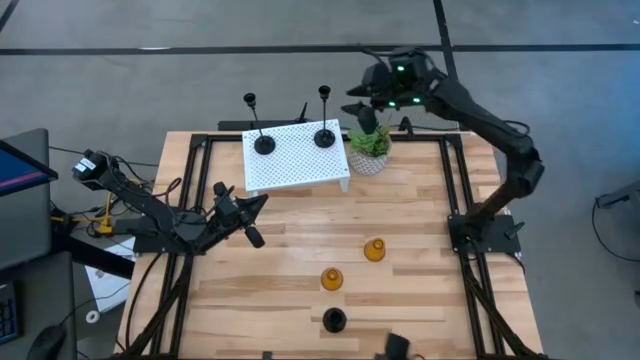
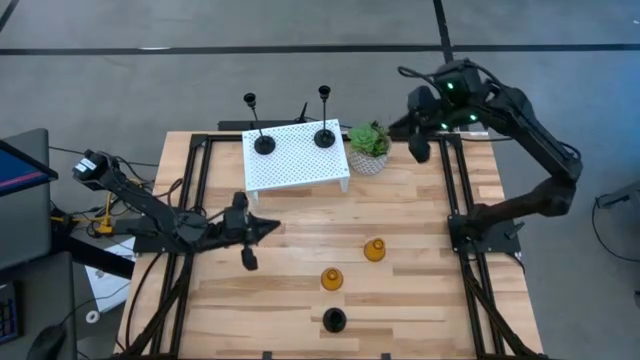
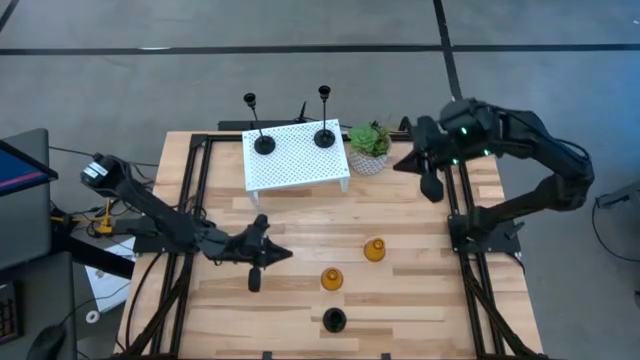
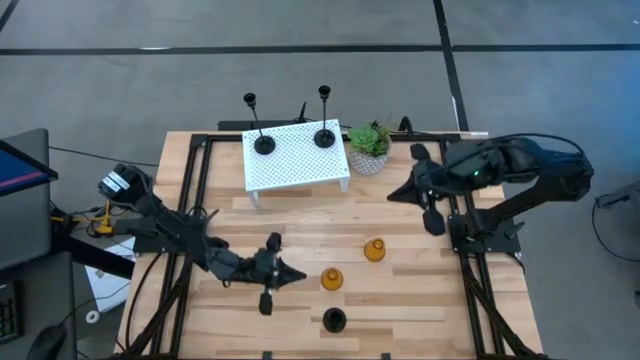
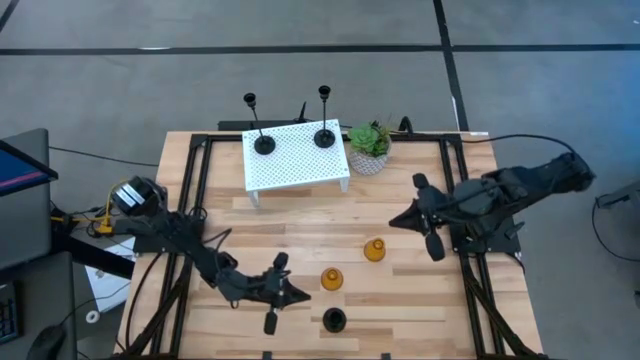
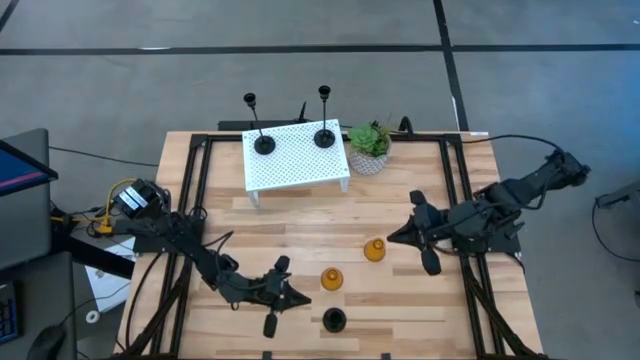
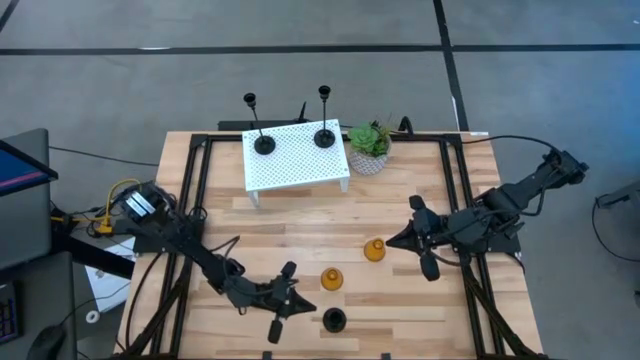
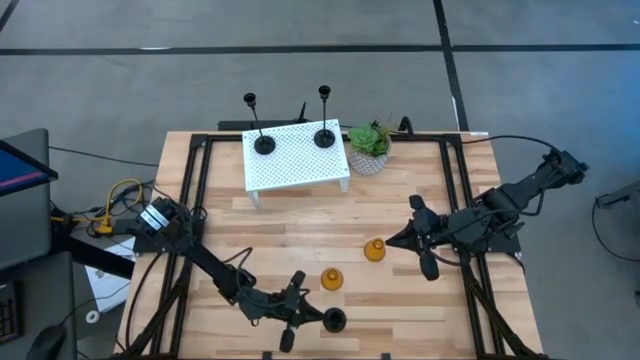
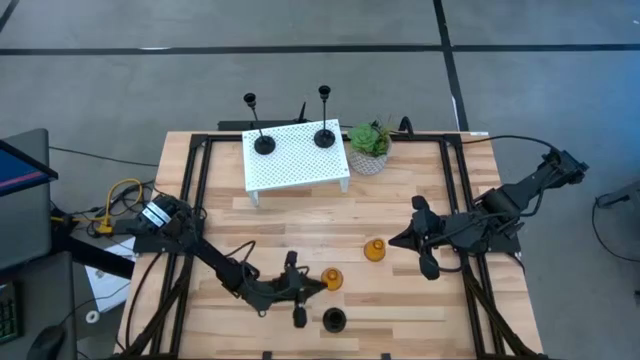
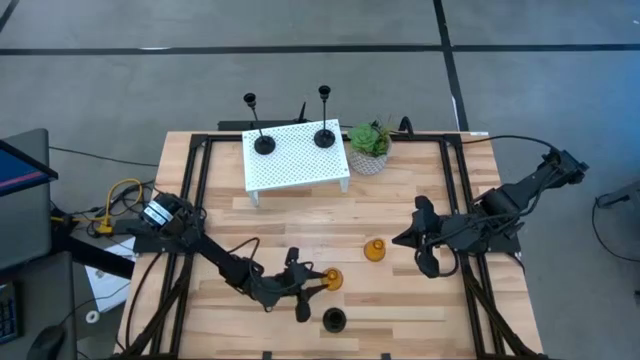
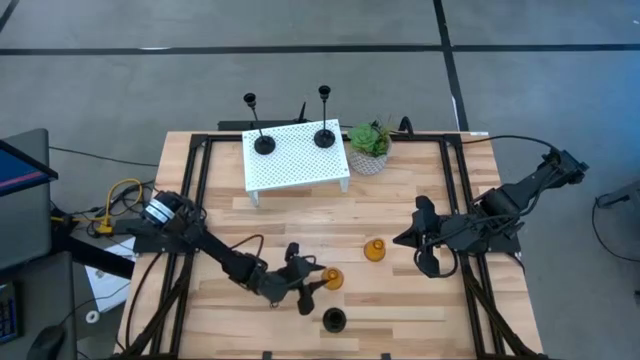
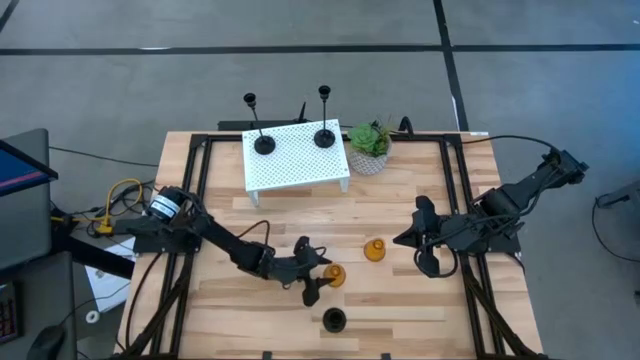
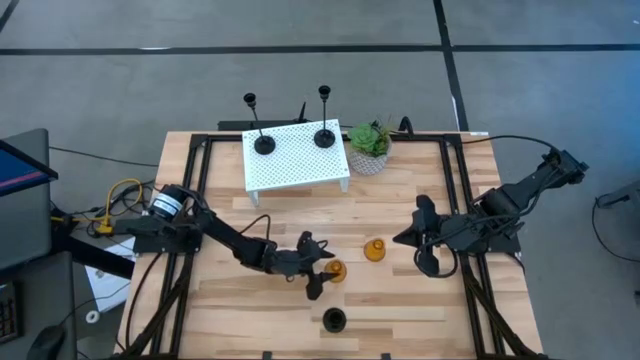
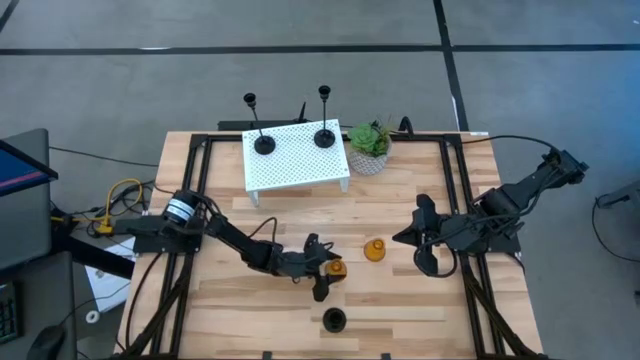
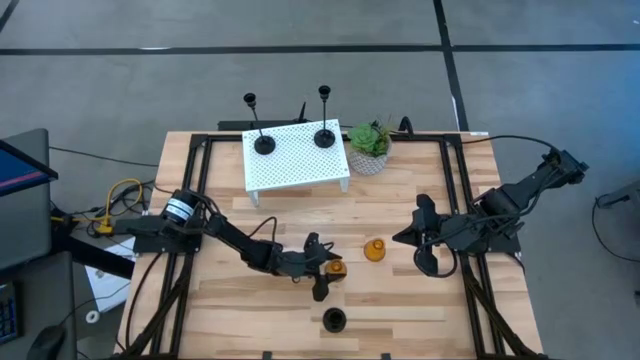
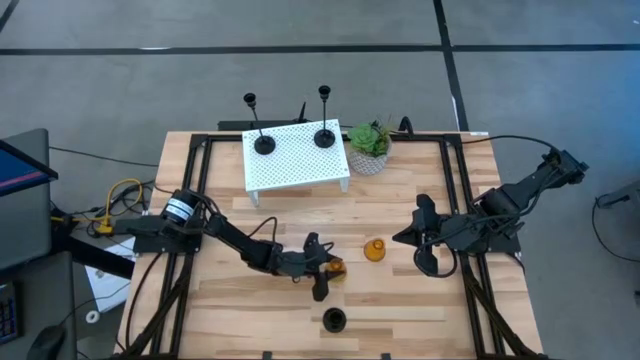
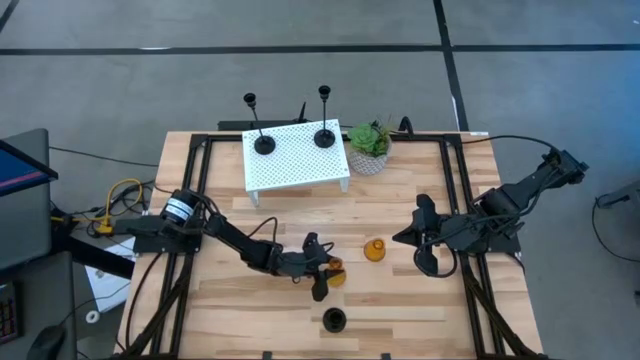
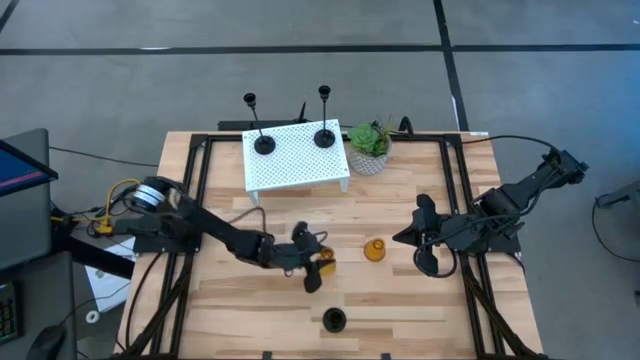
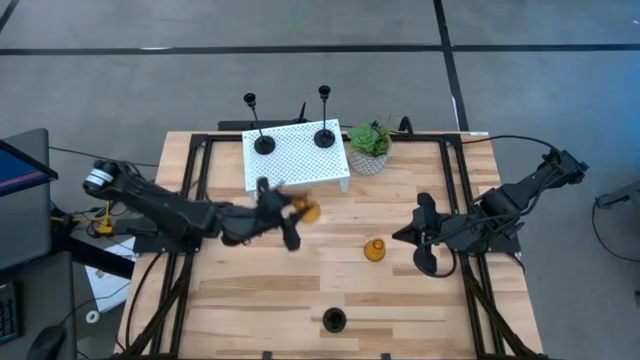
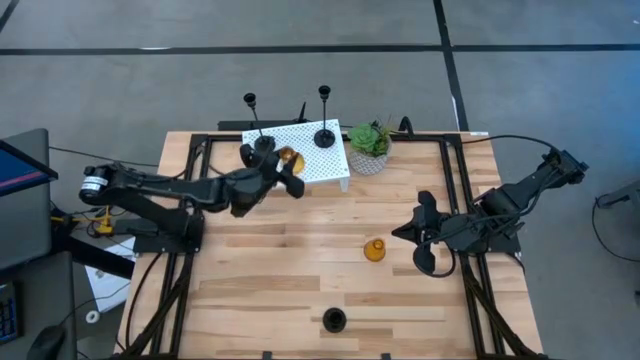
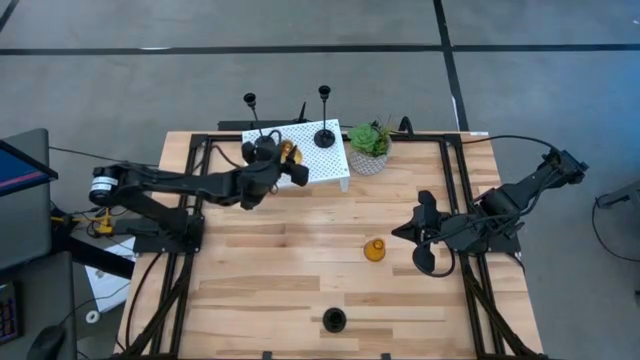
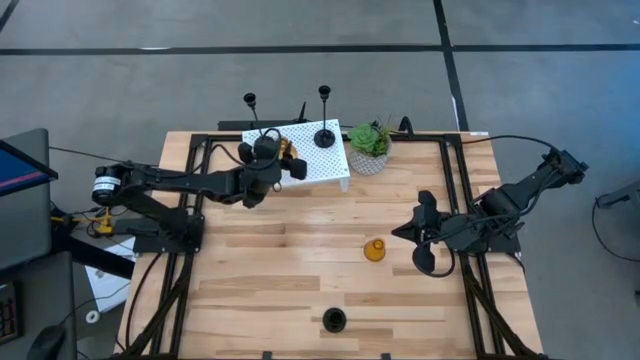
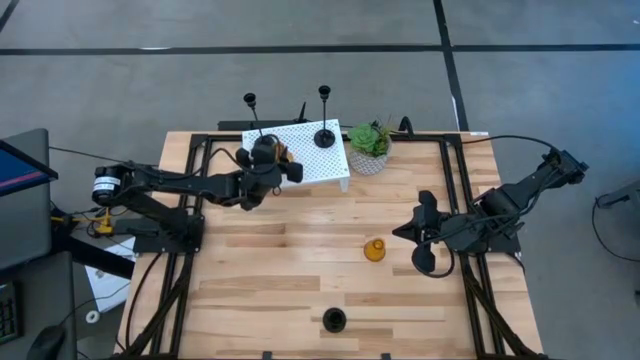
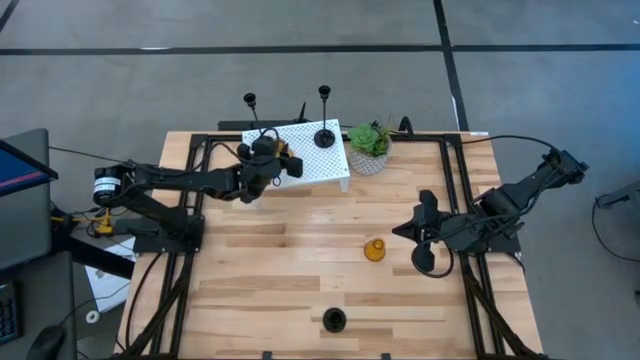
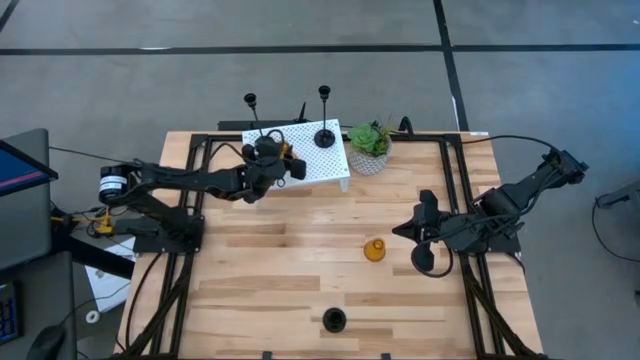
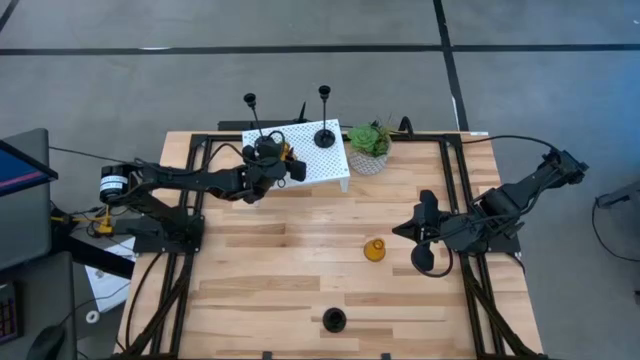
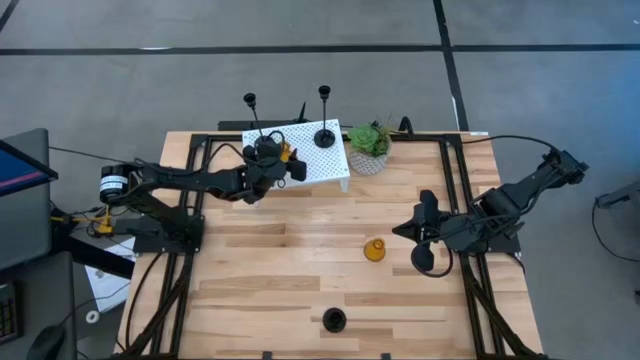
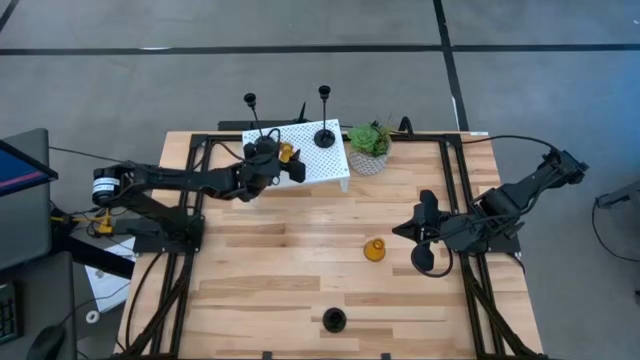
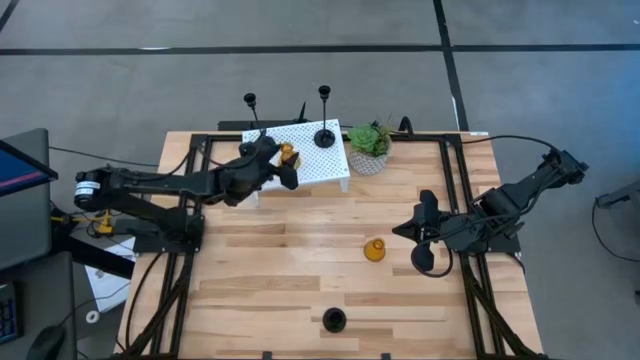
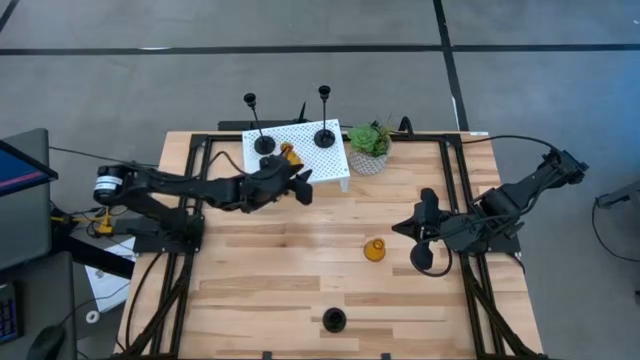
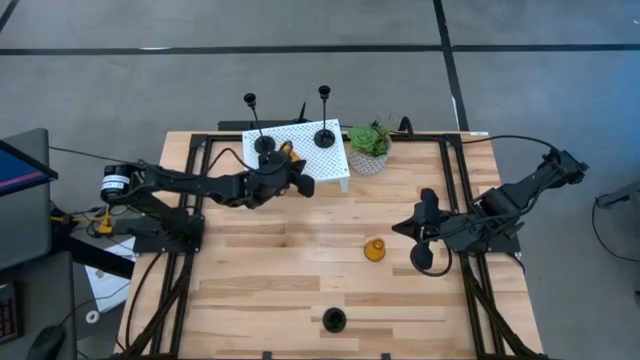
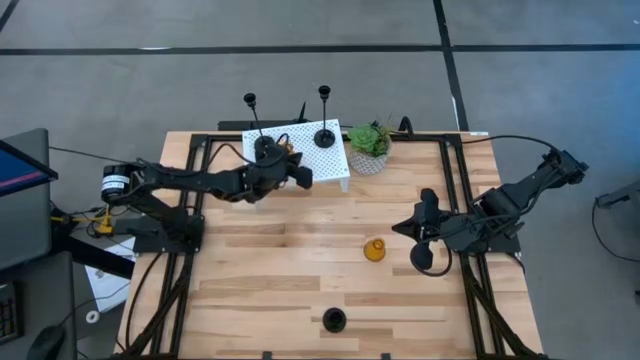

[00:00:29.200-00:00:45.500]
Task: Pick & Place candle stick holders
Put the left yellow glass candle holder on the shelf

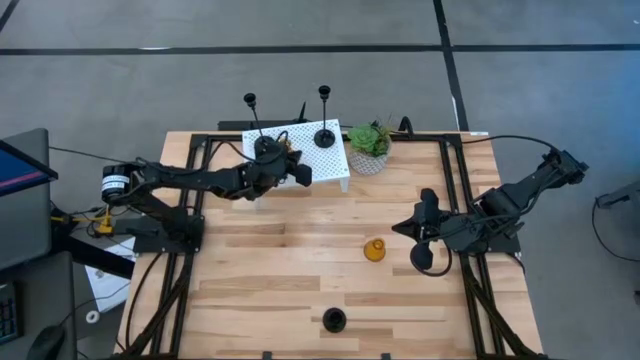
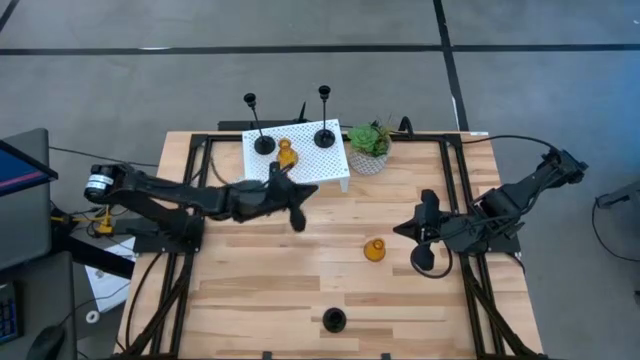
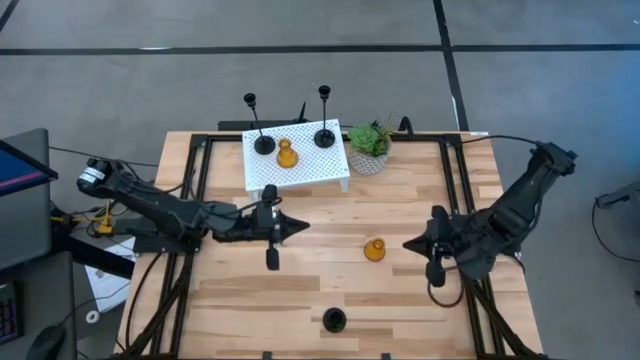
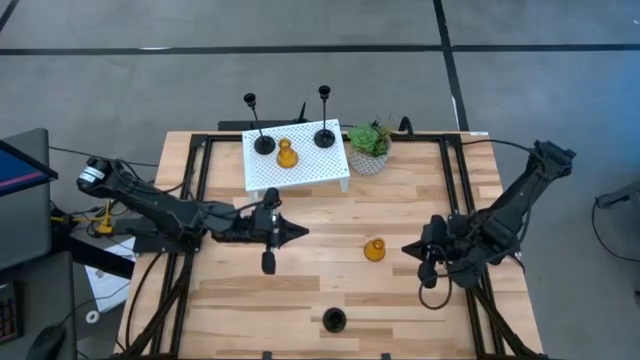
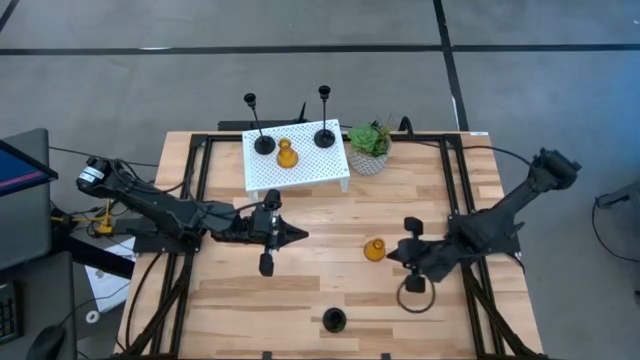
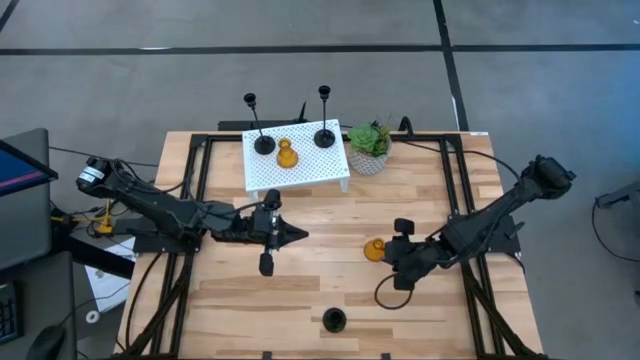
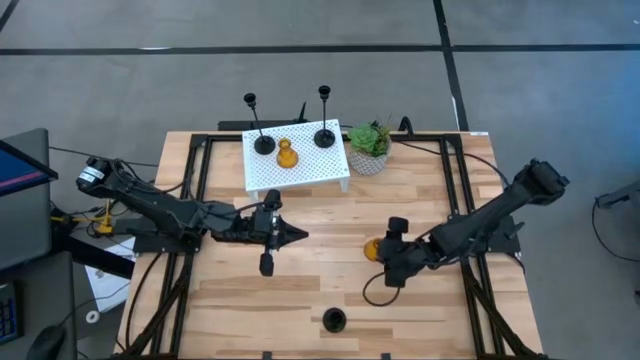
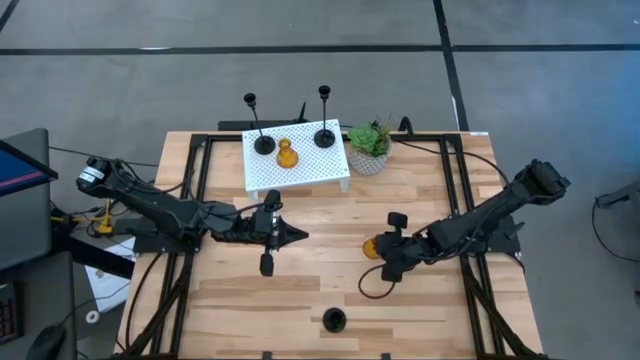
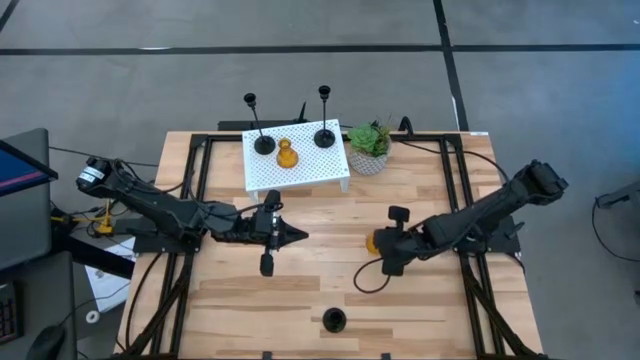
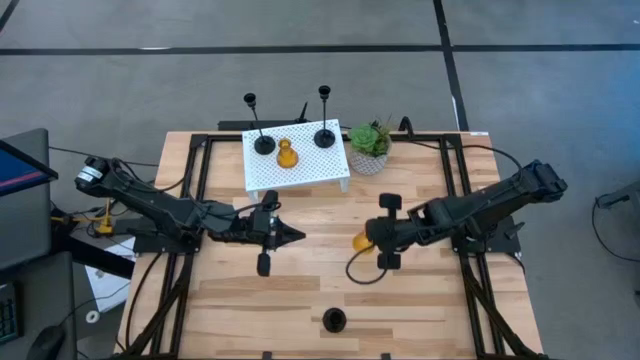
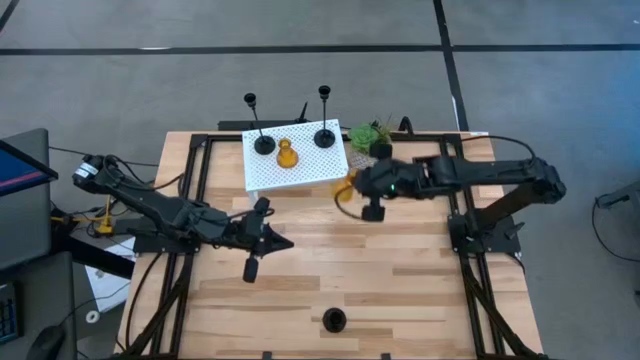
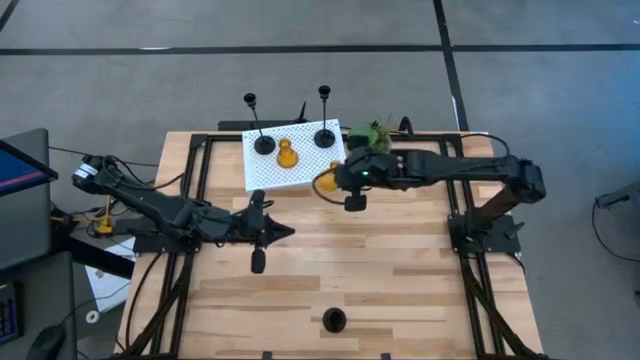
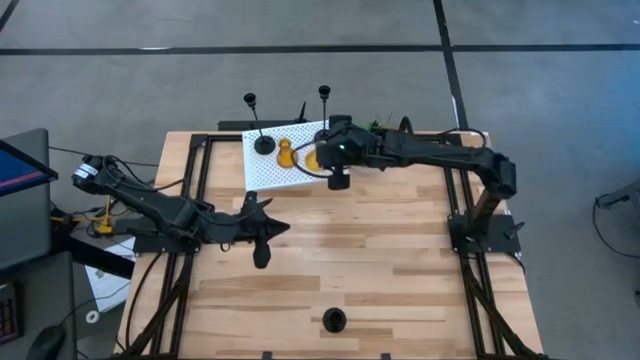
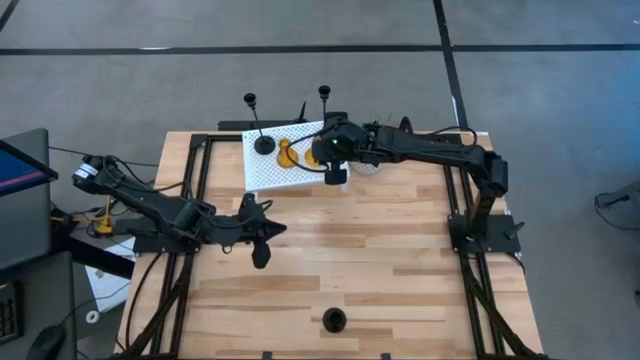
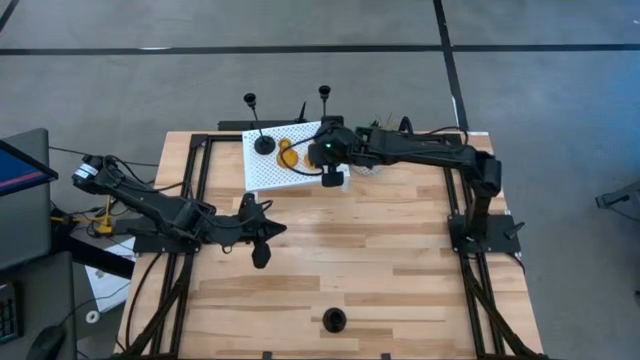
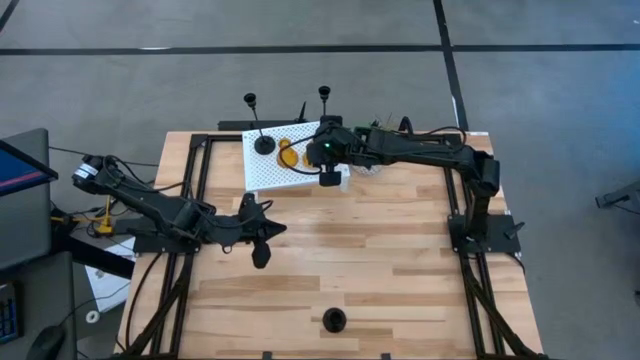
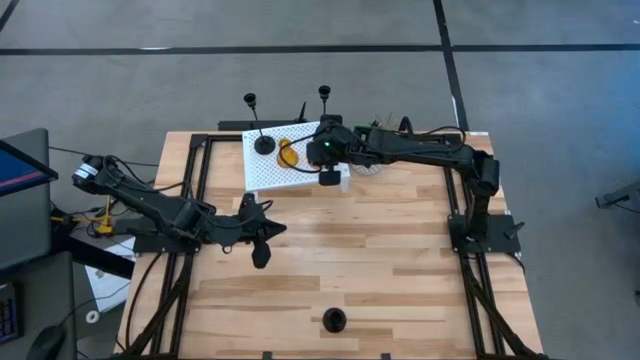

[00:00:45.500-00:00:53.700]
Put the yellow glass candle holder on the shelf
